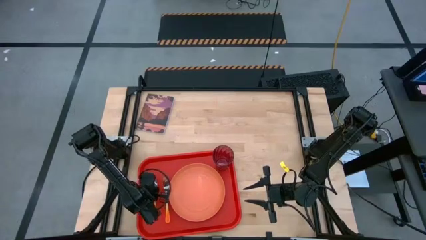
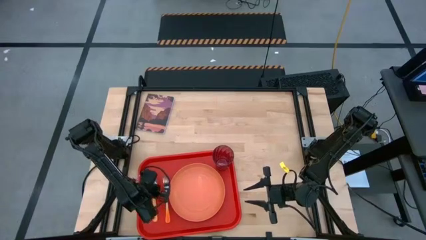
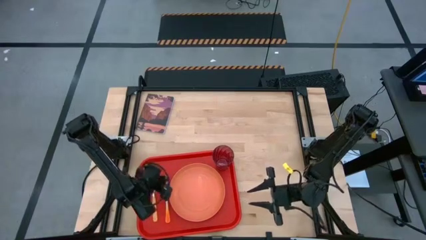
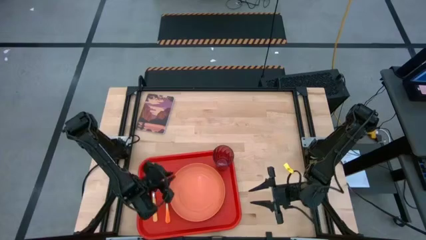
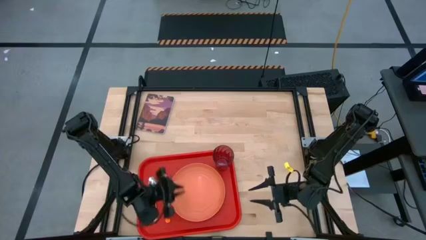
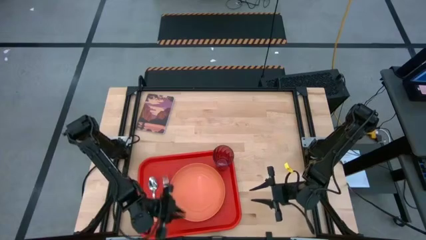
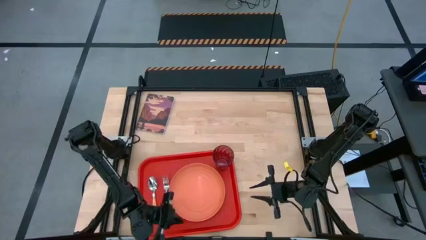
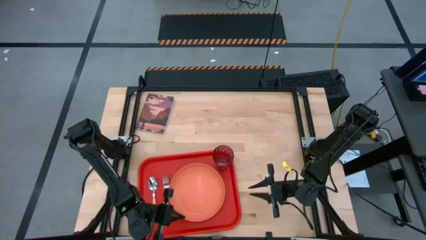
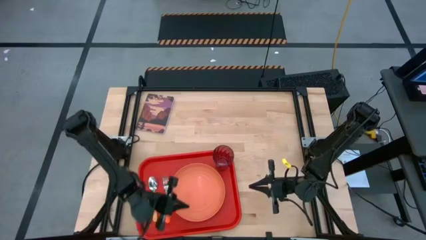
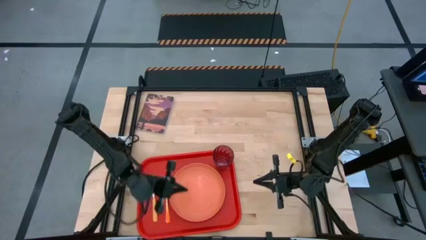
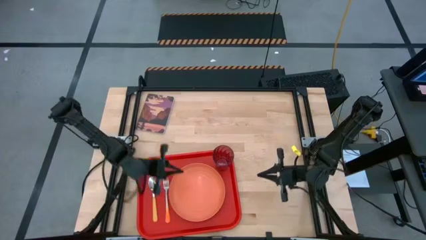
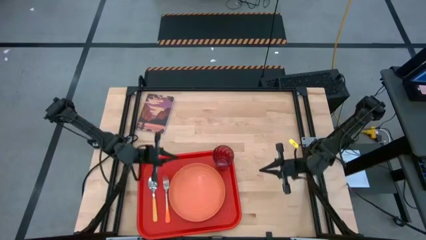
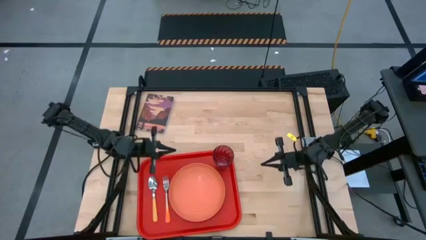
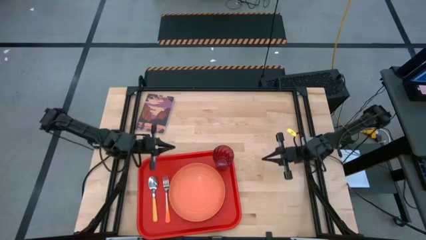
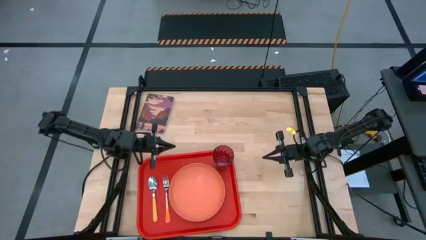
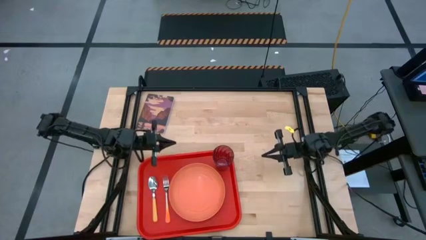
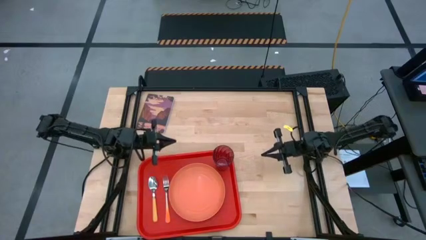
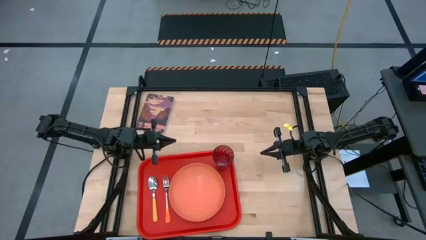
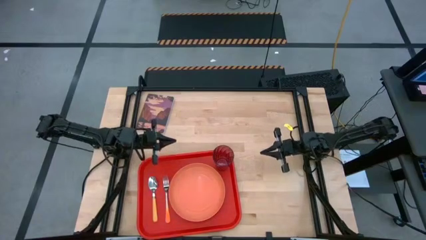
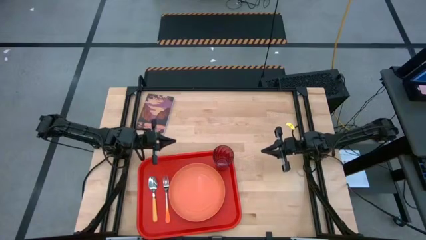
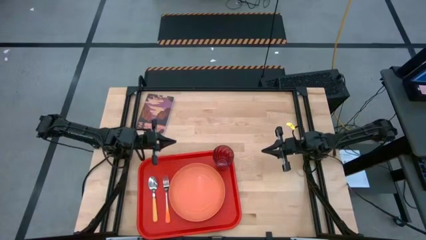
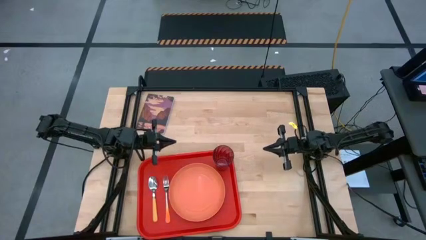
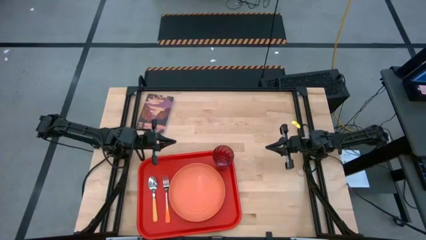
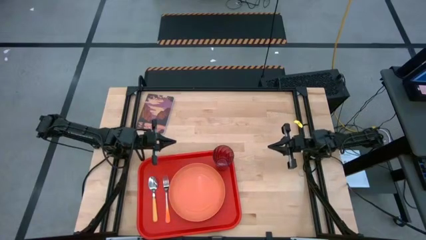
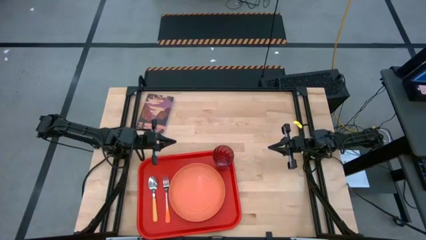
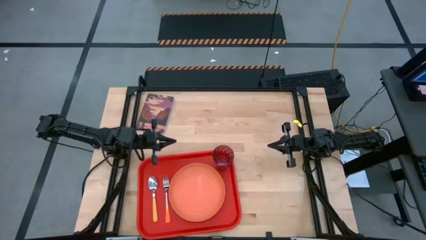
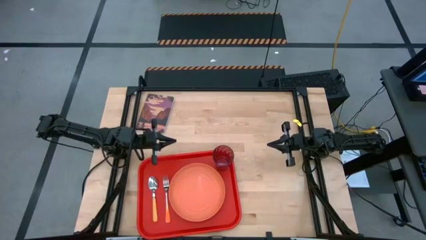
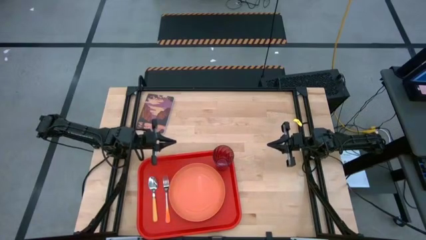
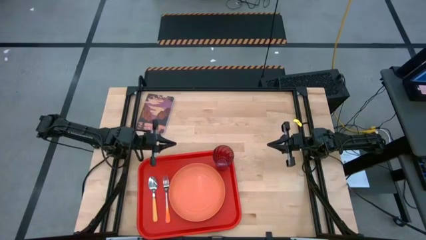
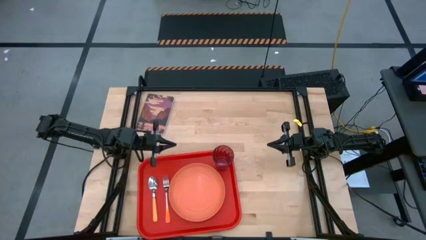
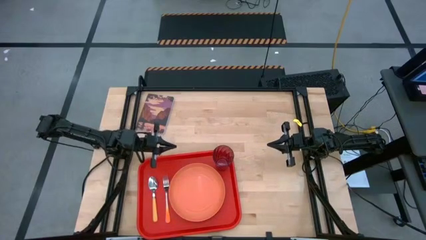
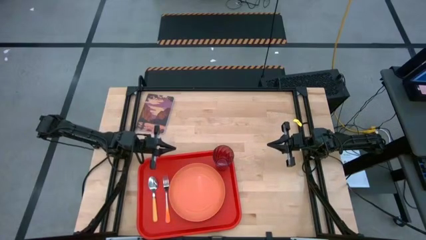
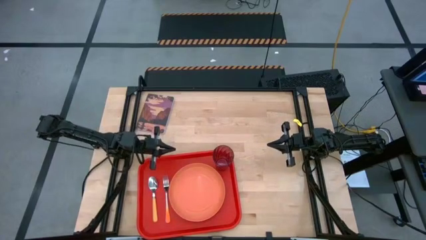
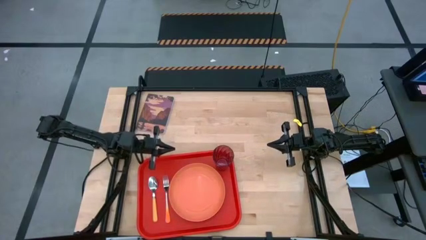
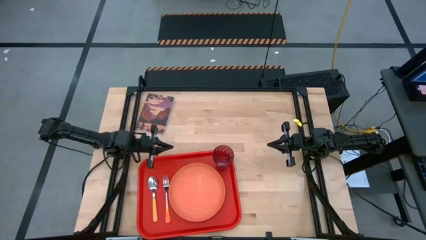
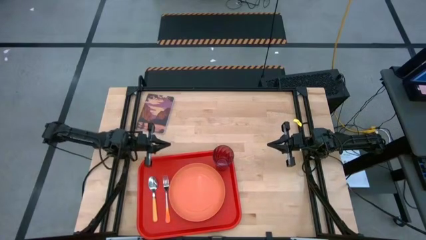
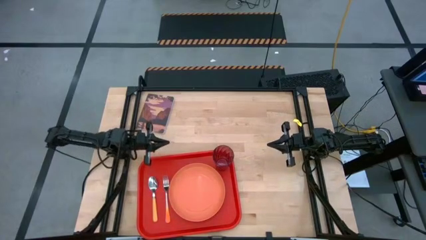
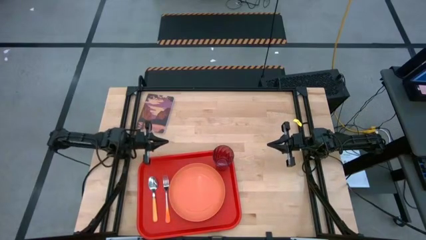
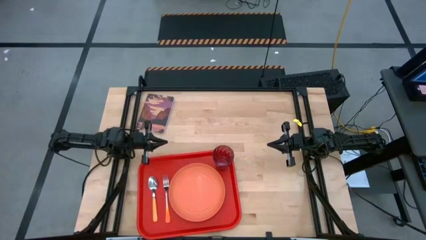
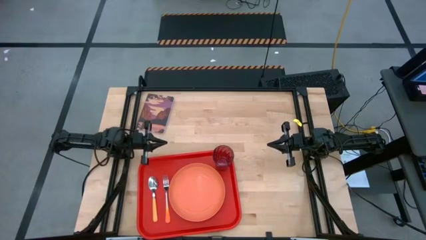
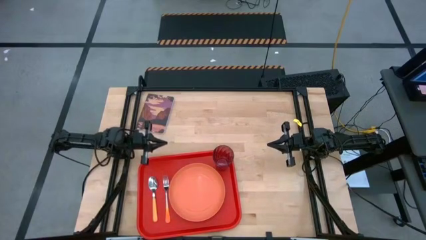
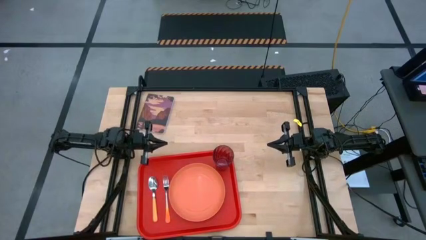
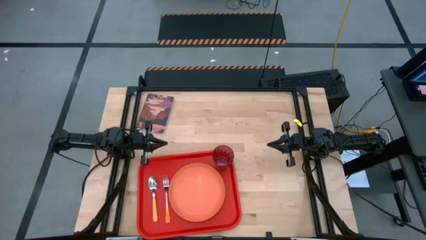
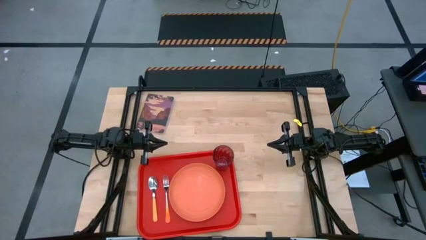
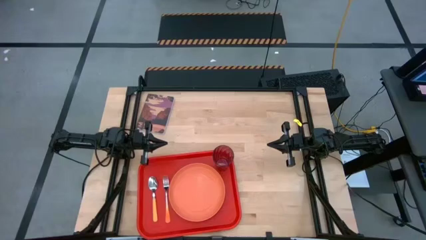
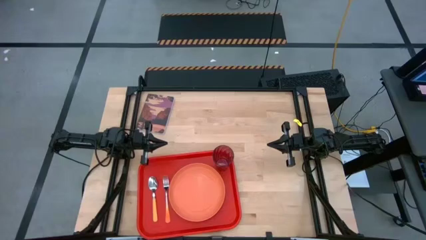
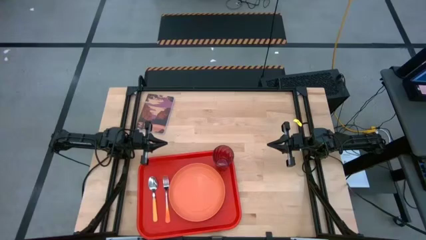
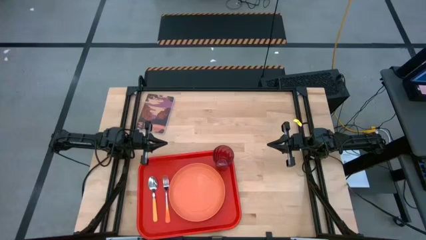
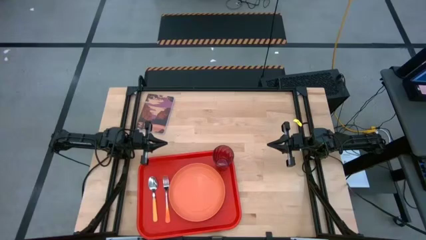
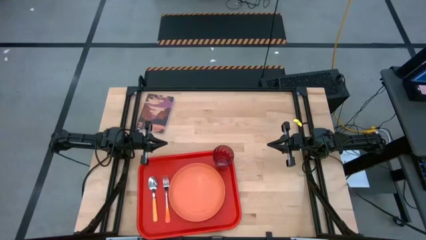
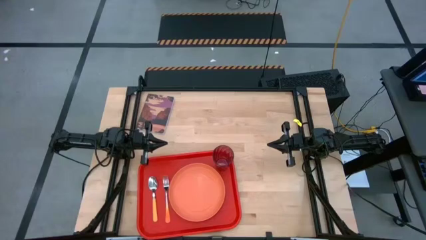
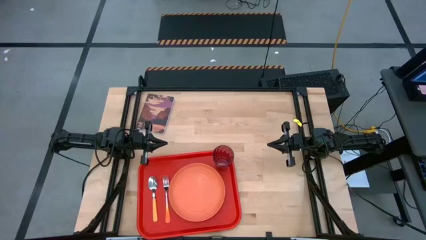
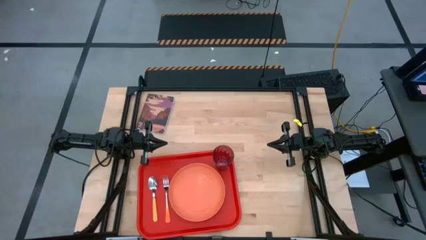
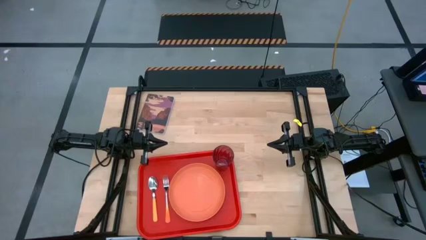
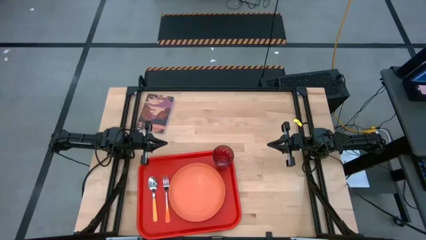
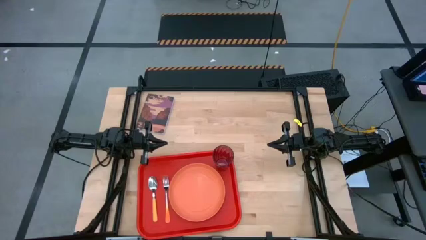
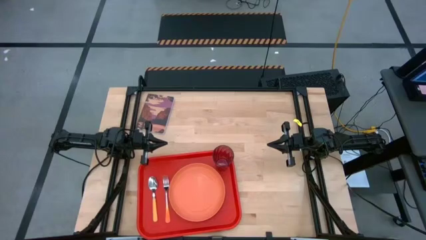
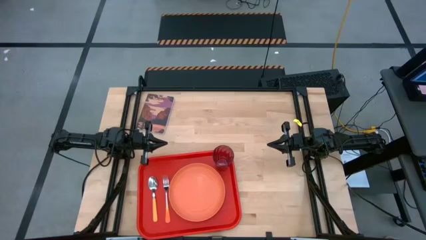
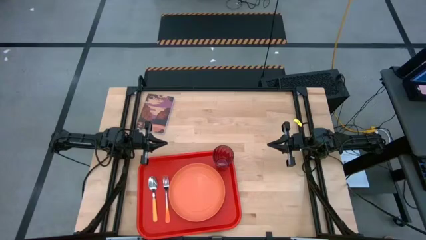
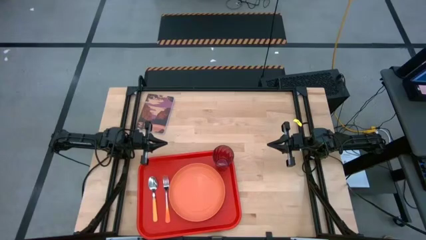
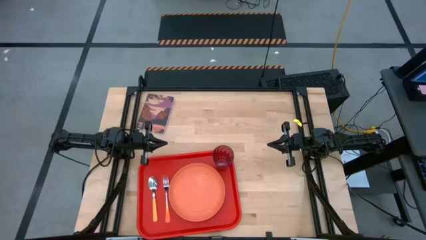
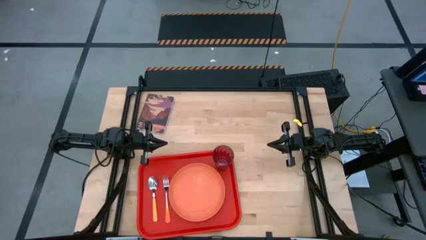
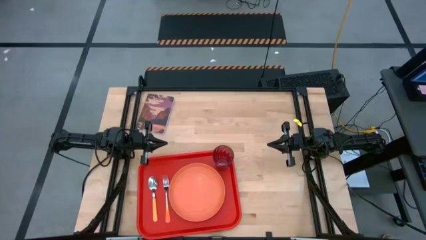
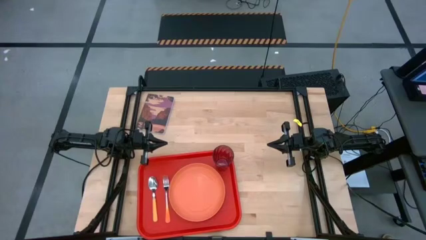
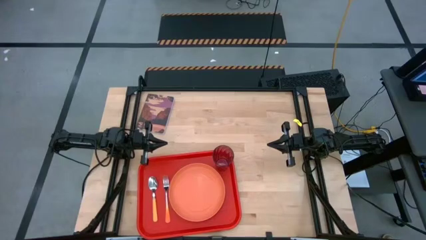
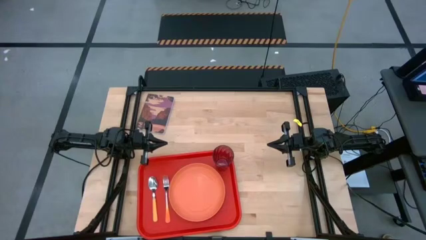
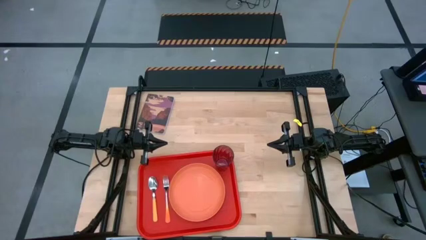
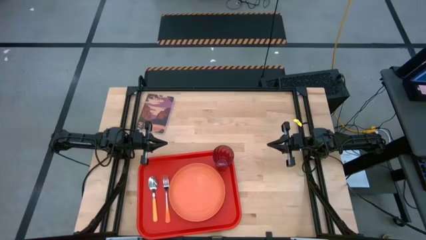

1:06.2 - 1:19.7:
Task: Pick and place plate/cup/fork/spoon on tray
Return to Home Position

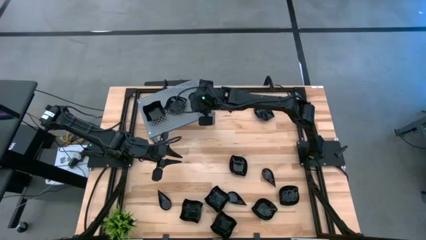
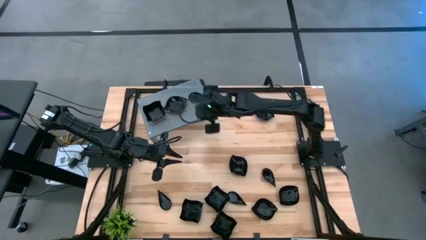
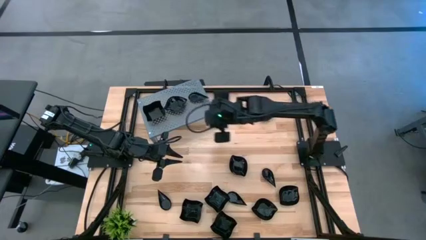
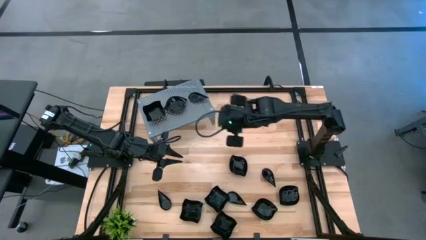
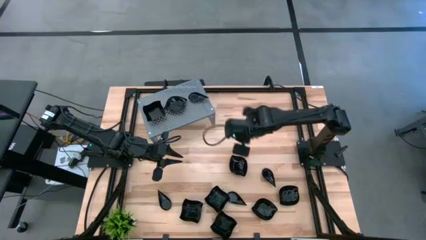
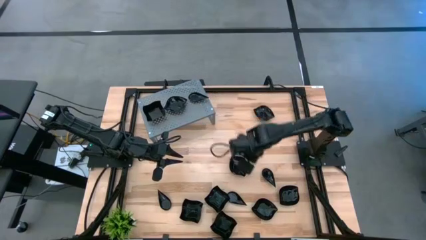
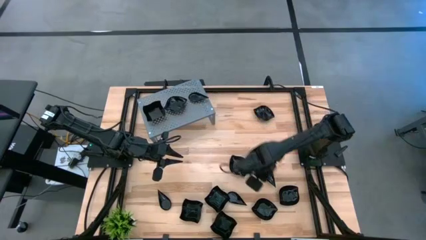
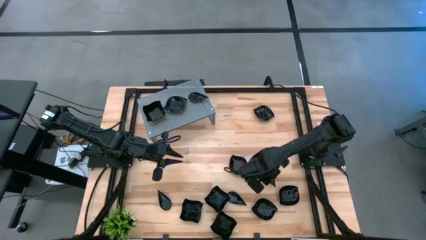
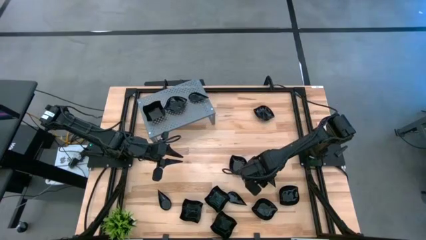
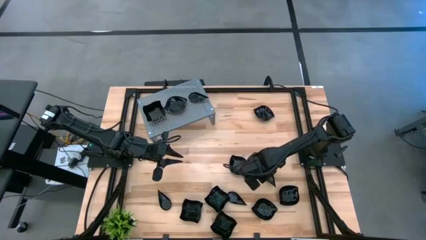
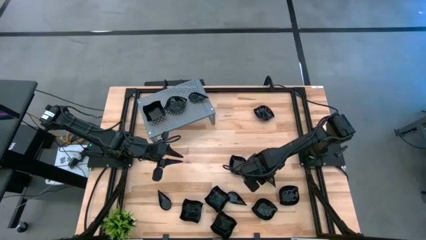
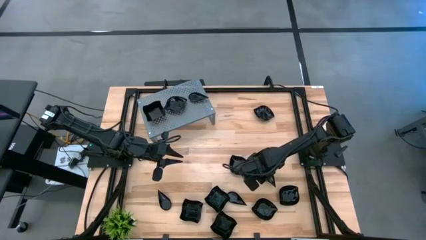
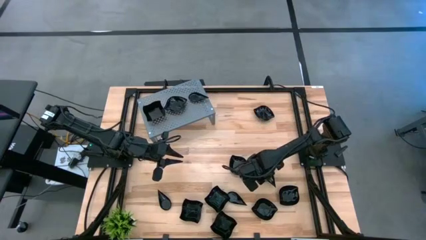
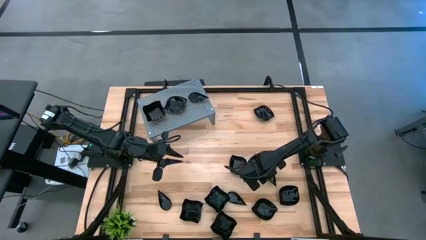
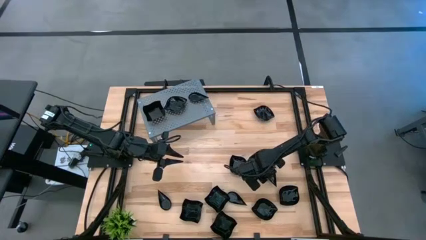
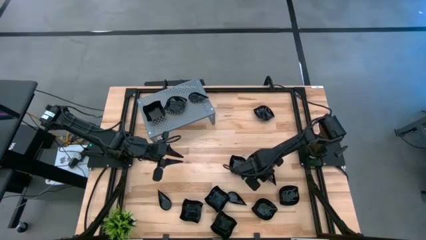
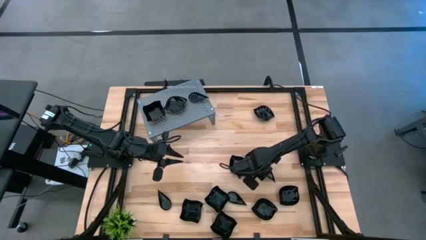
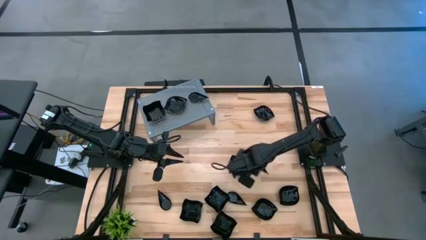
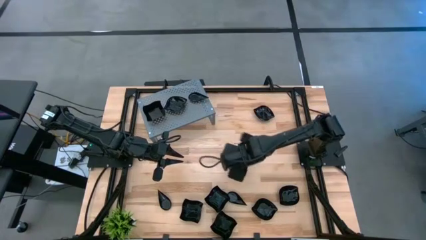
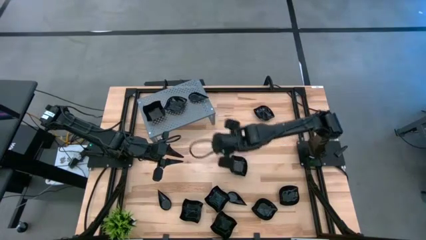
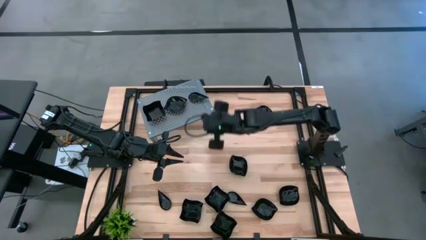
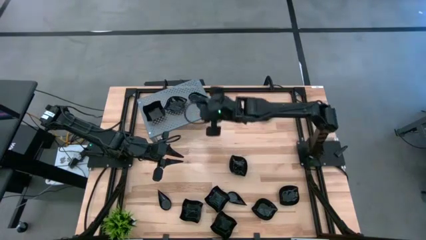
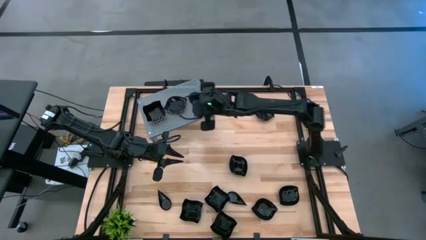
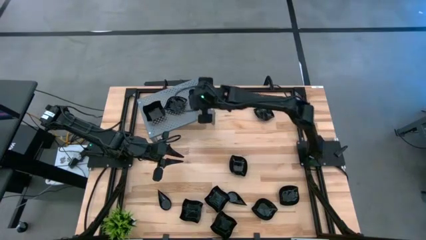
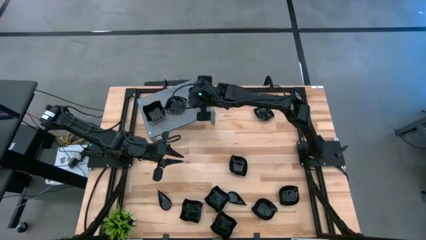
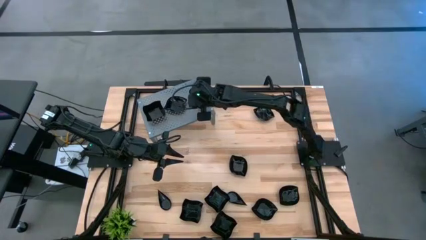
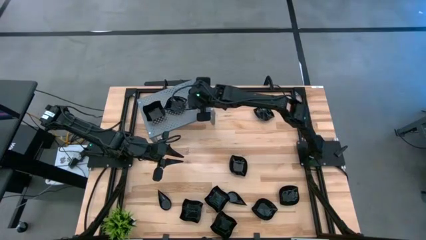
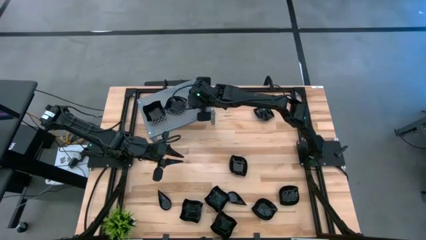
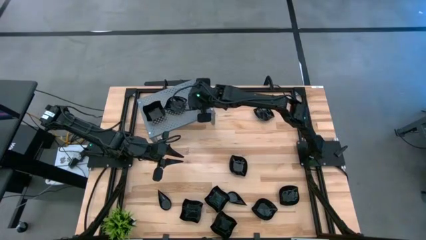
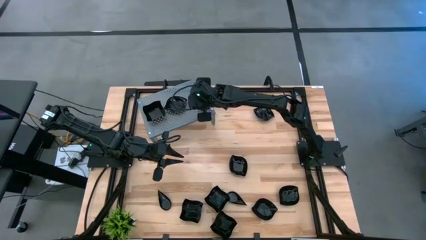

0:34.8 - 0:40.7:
Task: Pick & Place Mini shaped plates
Stack the black drop shaped plate on top of the black drop shaped plate on the shelf
